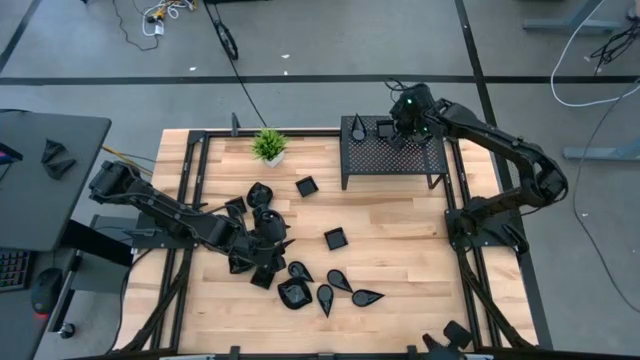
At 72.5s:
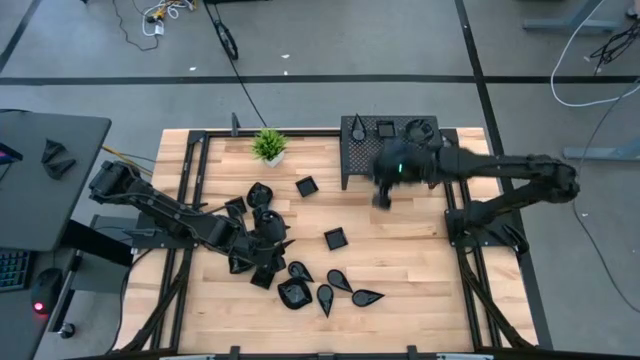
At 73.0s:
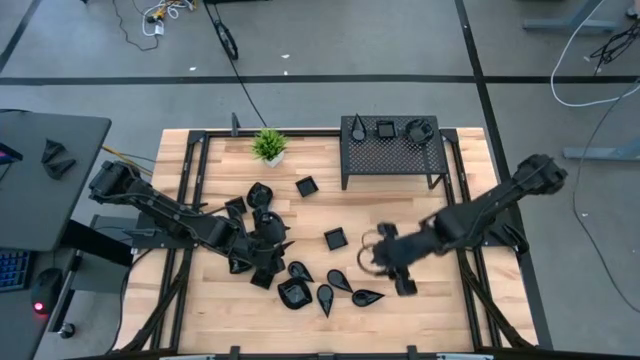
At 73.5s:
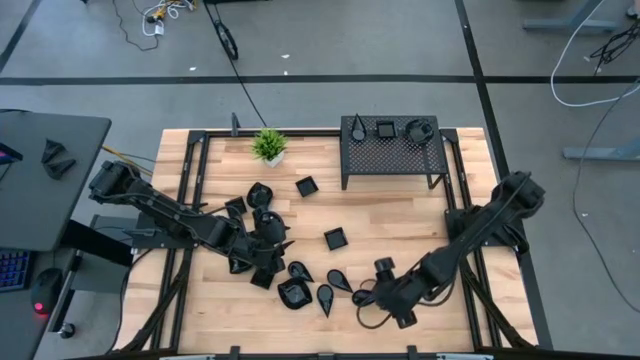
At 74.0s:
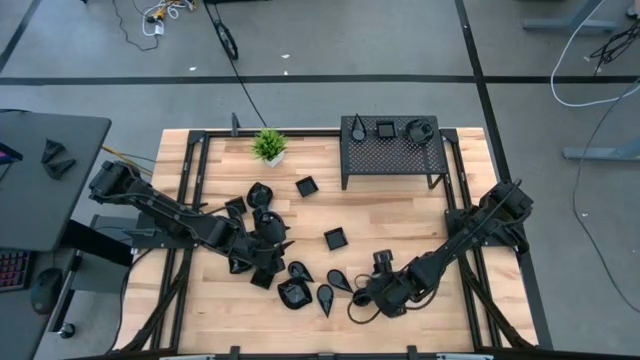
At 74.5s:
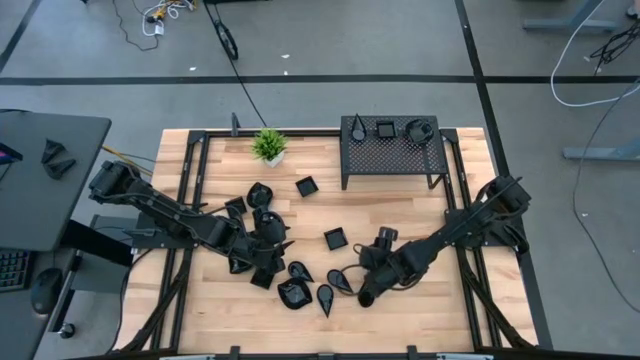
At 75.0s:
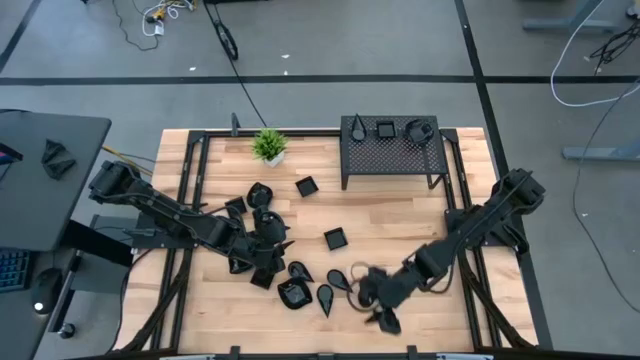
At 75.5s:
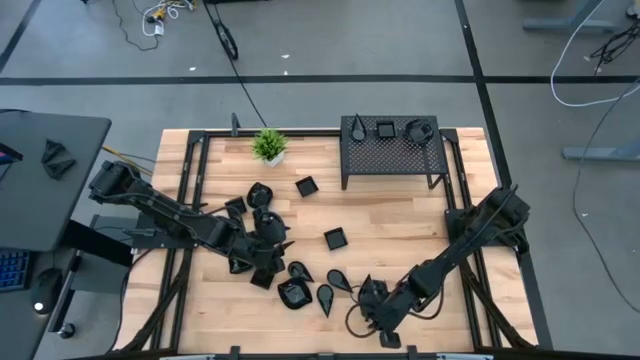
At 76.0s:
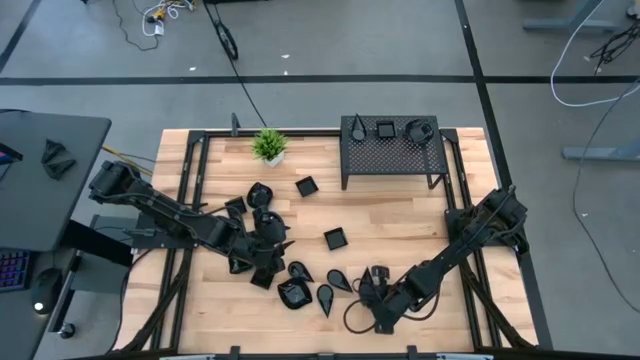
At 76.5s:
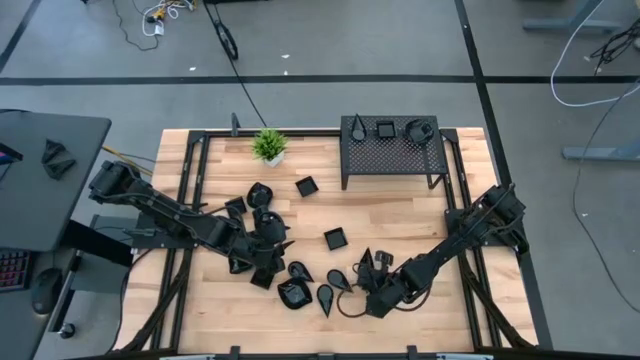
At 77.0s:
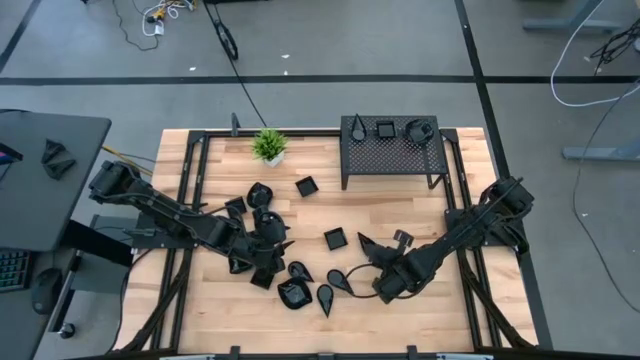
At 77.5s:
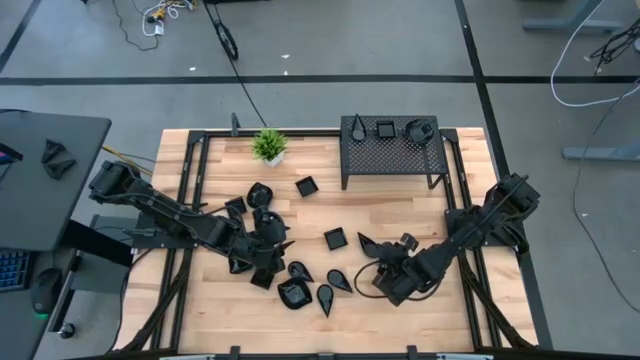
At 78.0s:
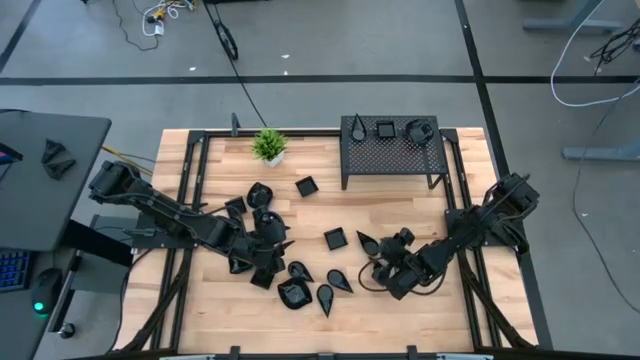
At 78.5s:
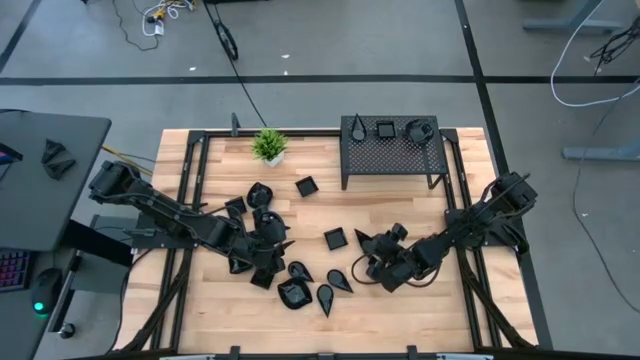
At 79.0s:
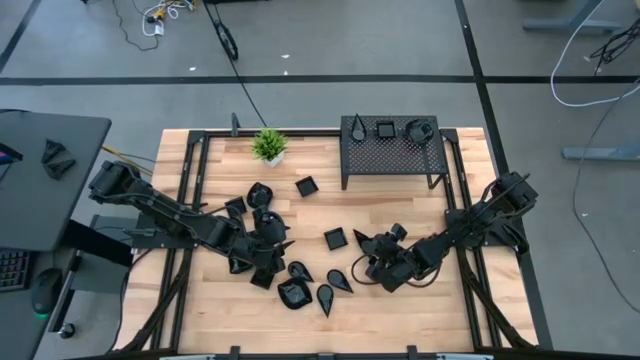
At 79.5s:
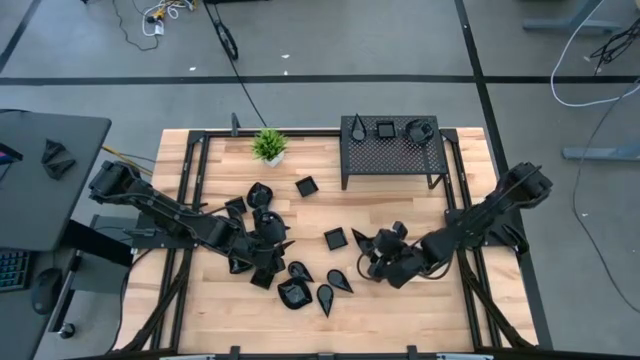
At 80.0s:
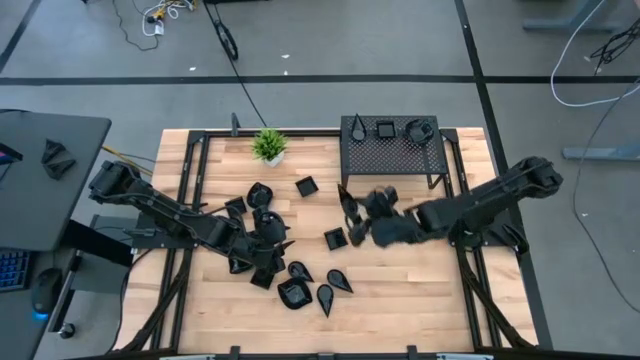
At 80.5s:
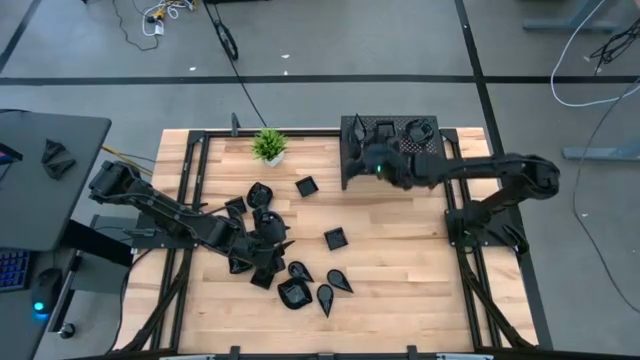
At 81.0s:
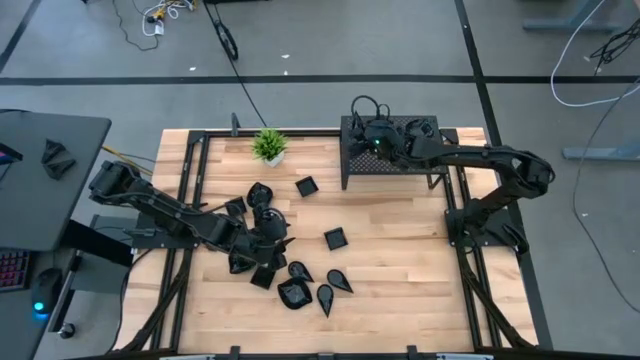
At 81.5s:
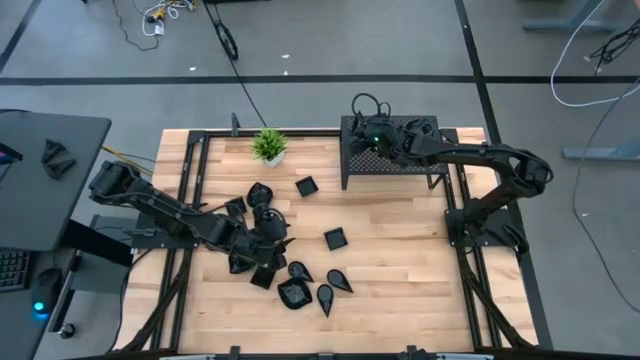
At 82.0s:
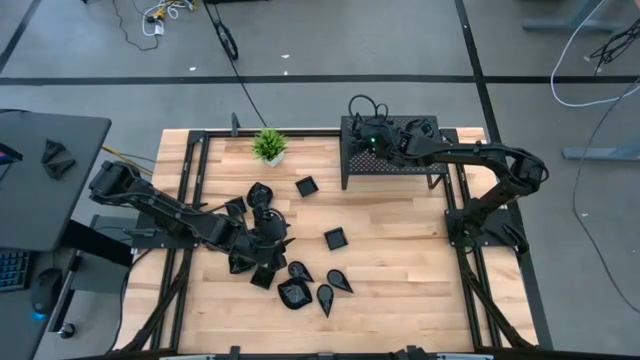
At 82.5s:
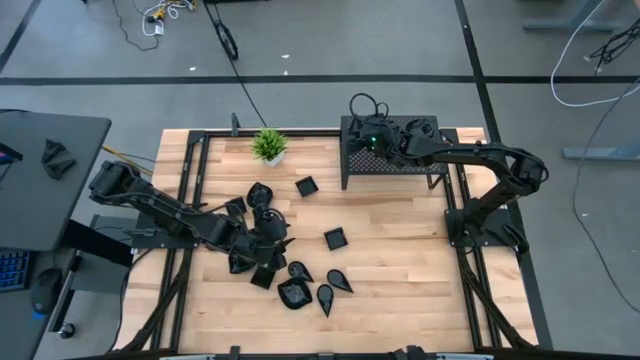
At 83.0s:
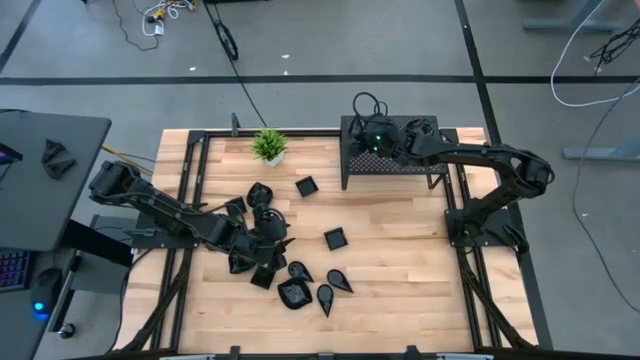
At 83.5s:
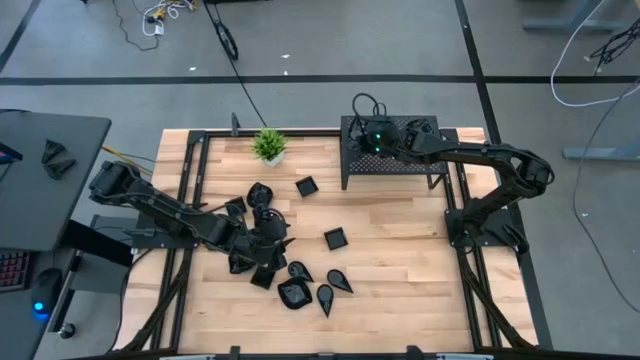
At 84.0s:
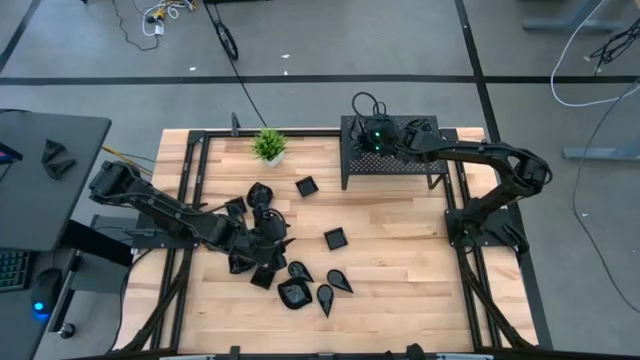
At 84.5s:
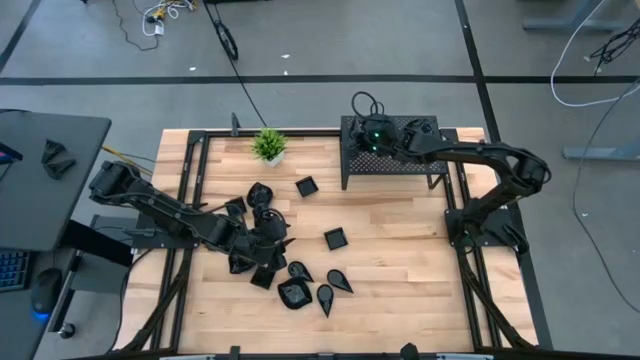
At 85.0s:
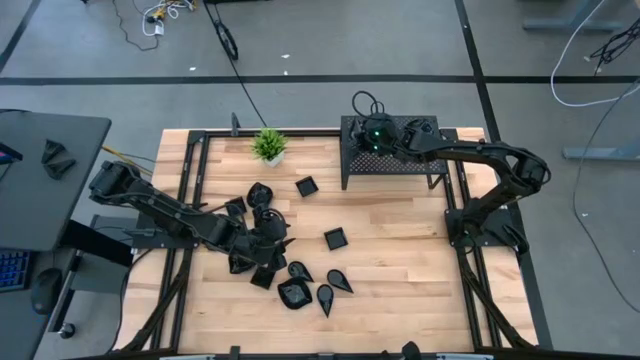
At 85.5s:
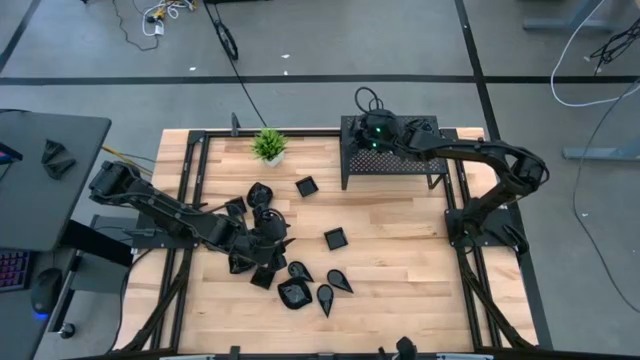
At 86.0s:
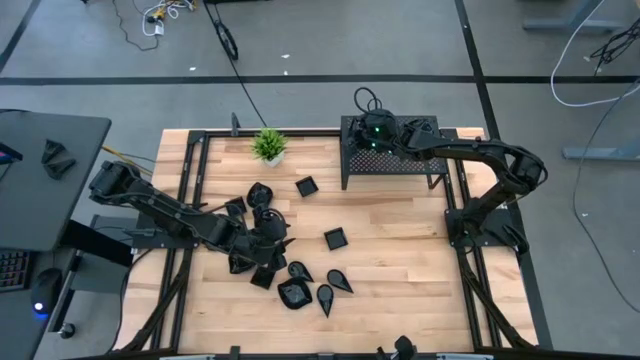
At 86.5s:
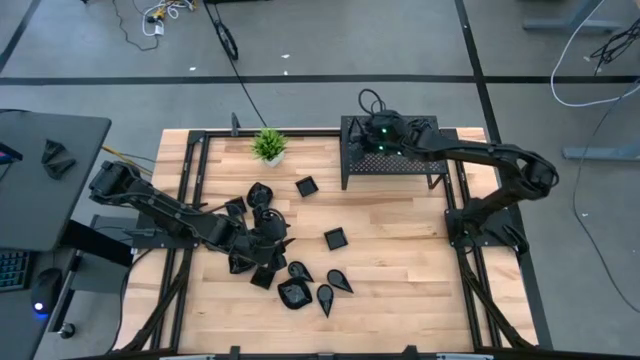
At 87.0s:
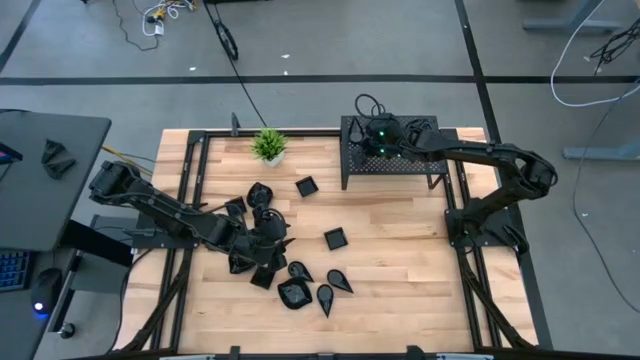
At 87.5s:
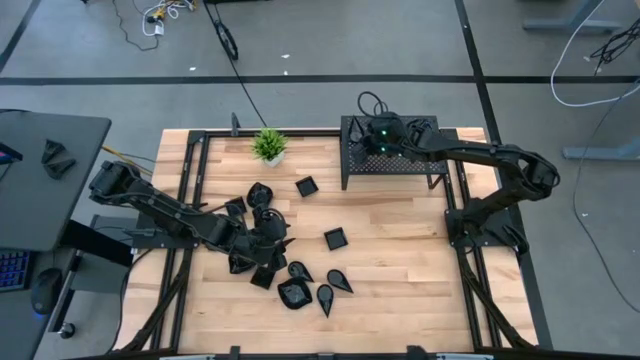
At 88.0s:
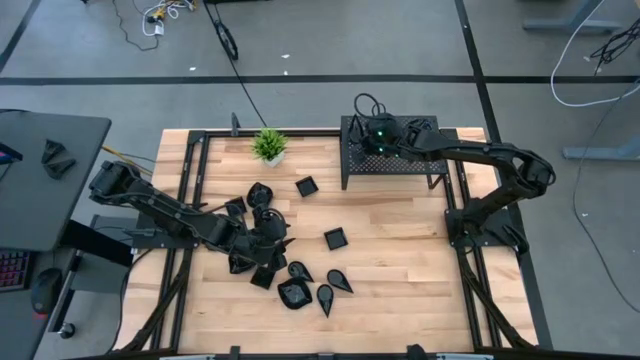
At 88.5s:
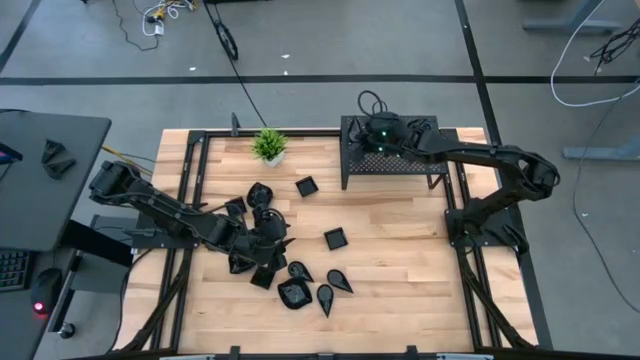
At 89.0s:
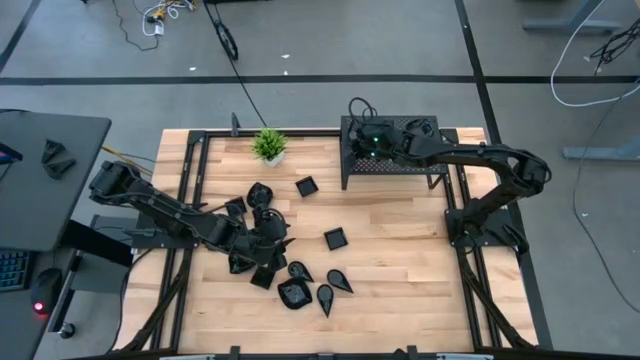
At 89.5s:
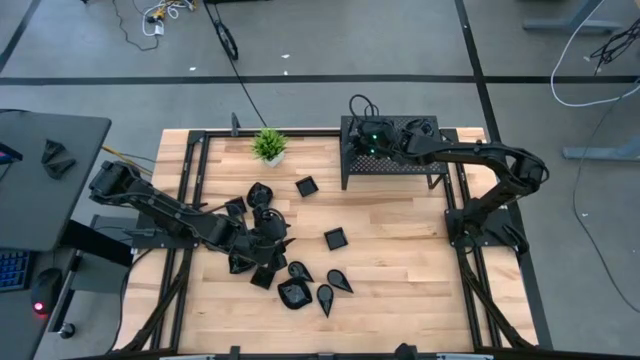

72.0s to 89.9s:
Task: Pick & Place Mini shaped plates
Stack the black drop-shaped plate on top of the black drop-shaped plate on the shelf

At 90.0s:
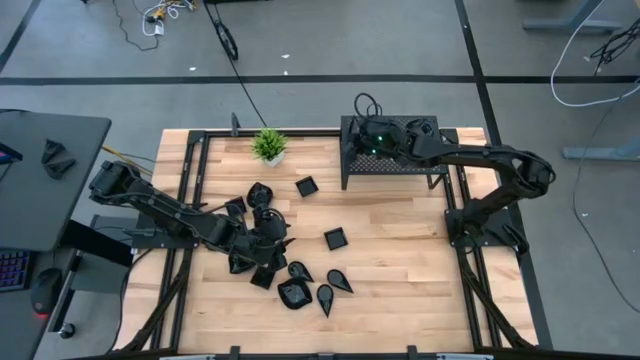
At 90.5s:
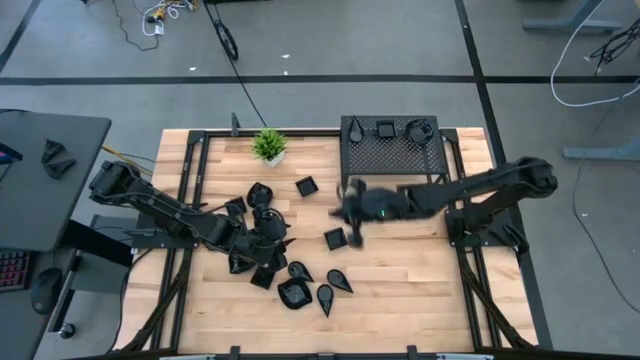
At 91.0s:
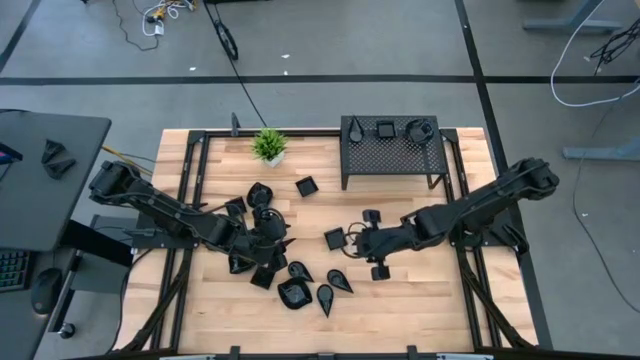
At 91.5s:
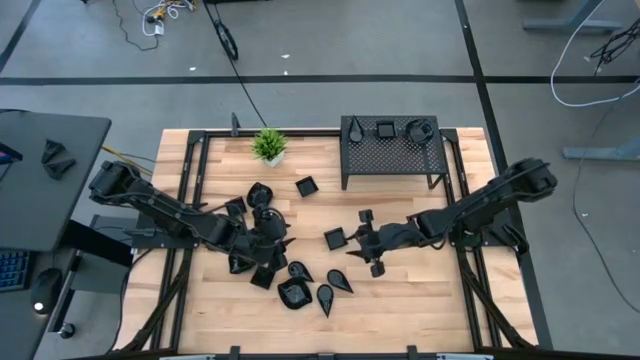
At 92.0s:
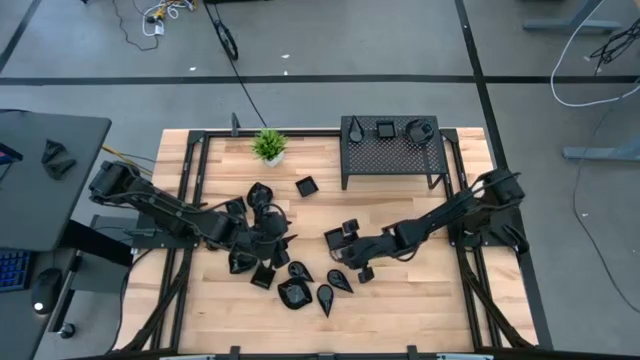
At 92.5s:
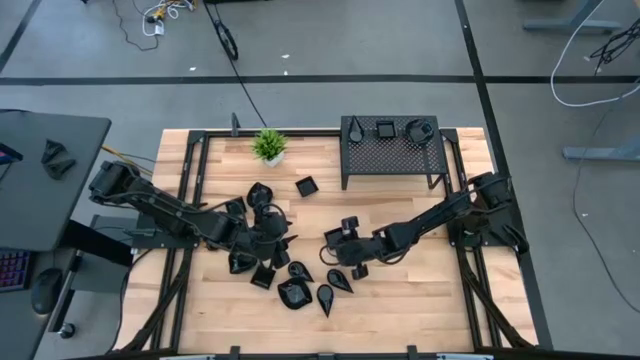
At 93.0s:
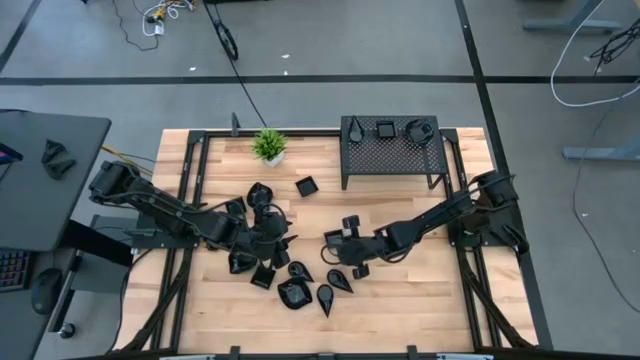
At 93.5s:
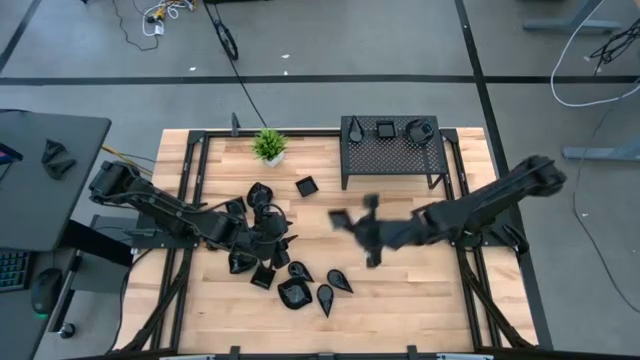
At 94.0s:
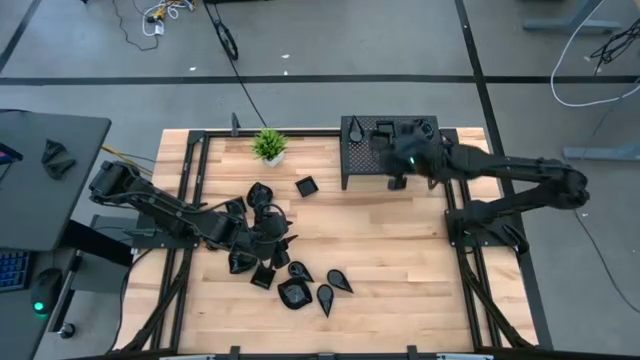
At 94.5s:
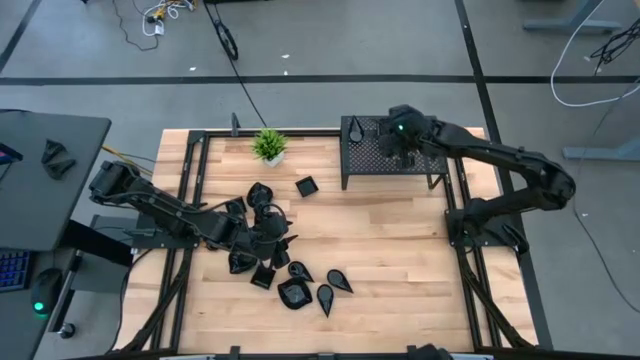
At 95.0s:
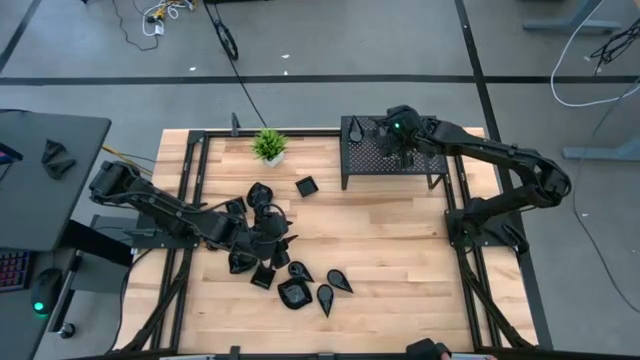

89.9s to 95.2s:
Stack the black square plate on top of the black square plate on the shelf
